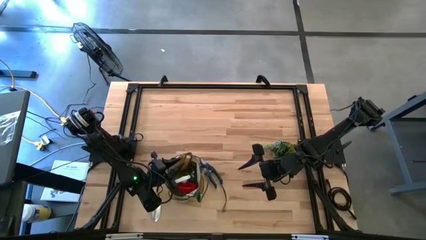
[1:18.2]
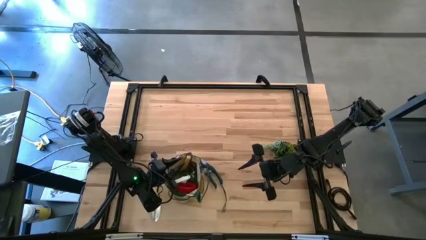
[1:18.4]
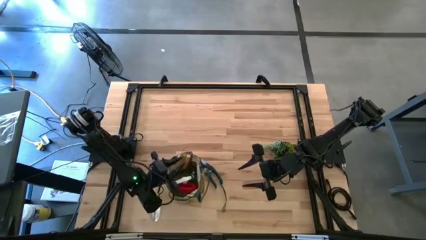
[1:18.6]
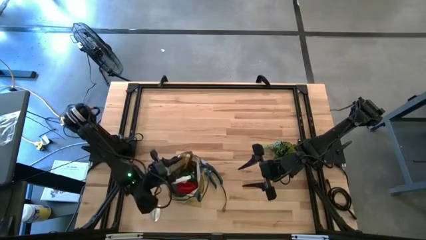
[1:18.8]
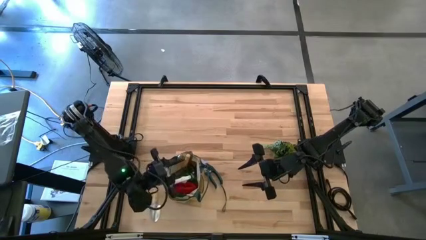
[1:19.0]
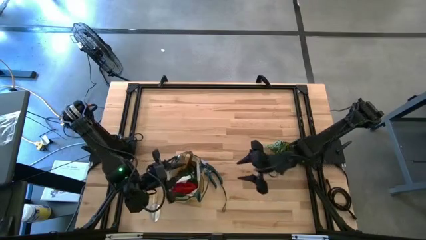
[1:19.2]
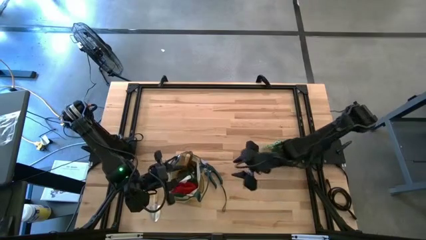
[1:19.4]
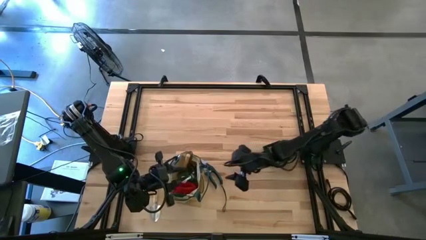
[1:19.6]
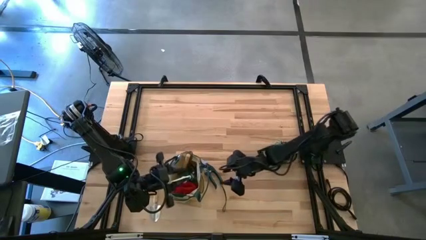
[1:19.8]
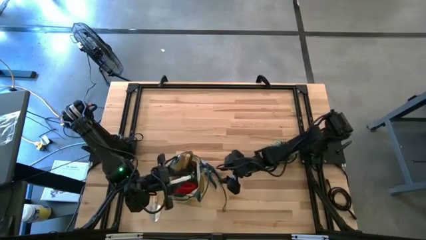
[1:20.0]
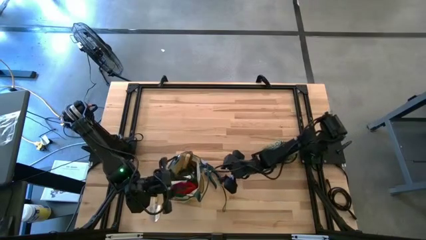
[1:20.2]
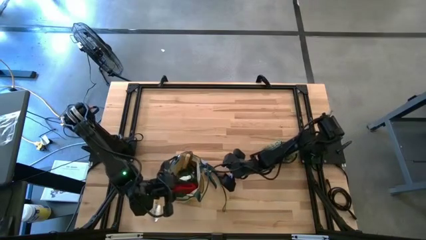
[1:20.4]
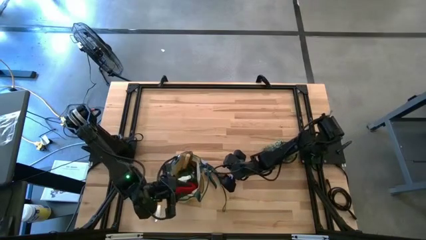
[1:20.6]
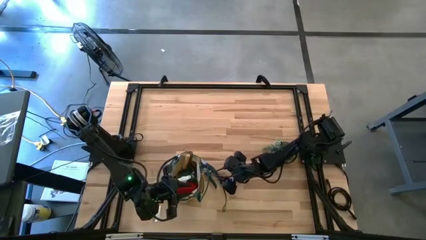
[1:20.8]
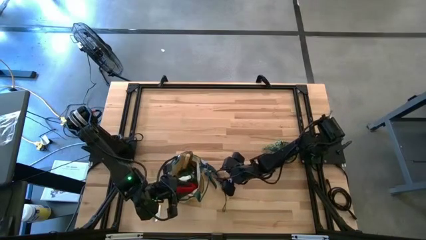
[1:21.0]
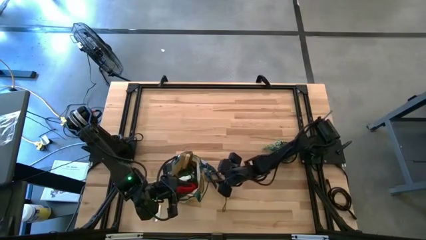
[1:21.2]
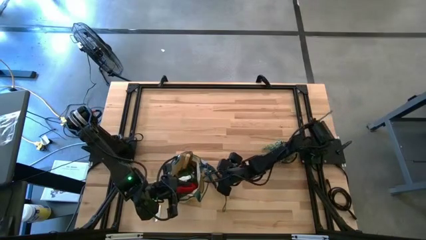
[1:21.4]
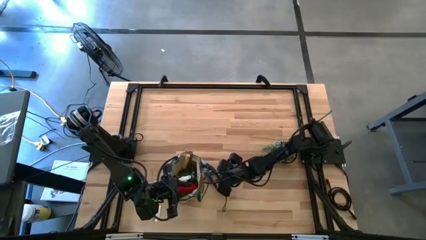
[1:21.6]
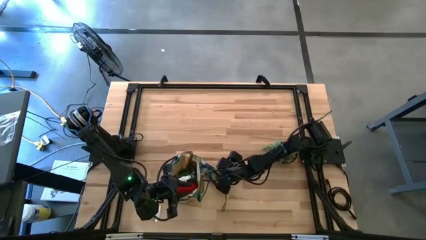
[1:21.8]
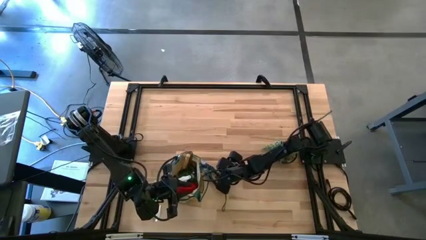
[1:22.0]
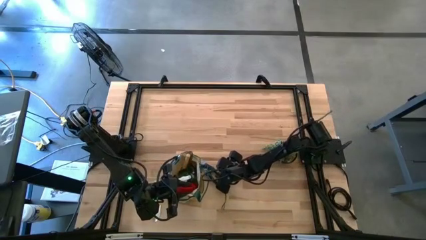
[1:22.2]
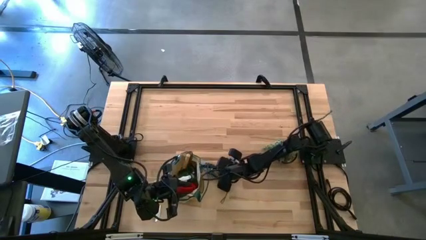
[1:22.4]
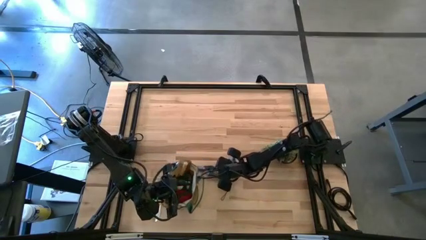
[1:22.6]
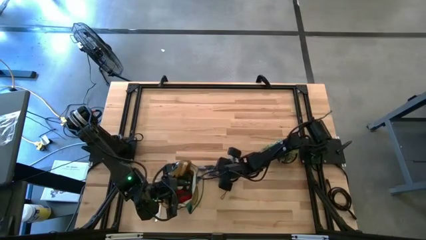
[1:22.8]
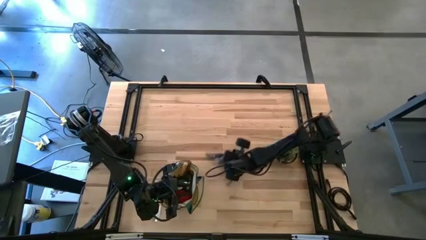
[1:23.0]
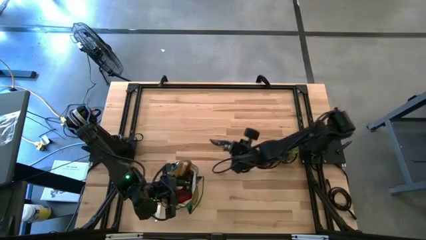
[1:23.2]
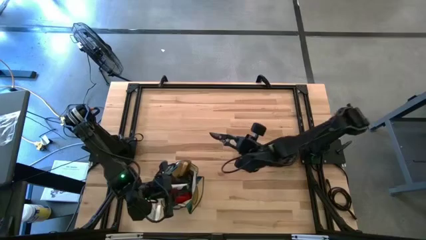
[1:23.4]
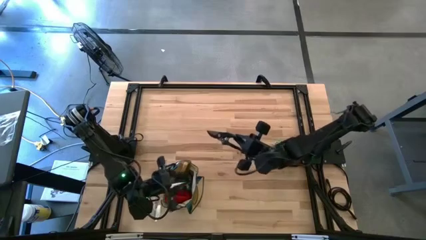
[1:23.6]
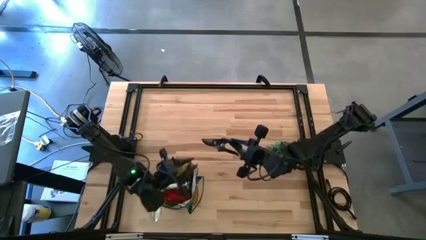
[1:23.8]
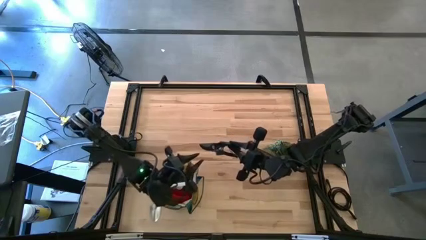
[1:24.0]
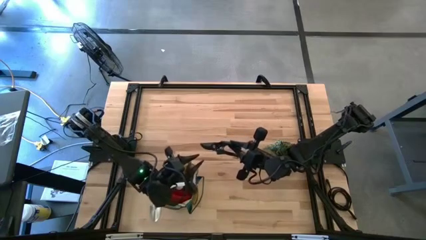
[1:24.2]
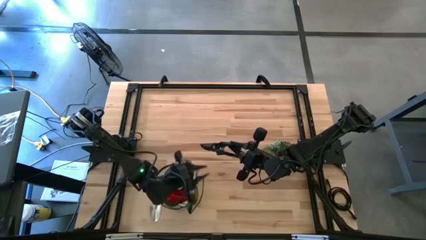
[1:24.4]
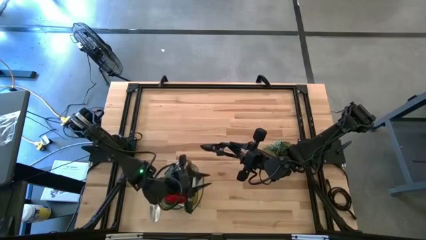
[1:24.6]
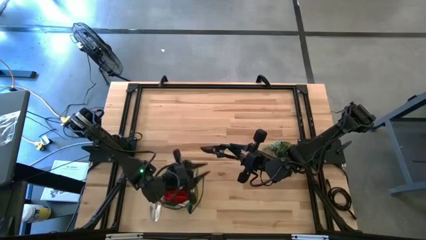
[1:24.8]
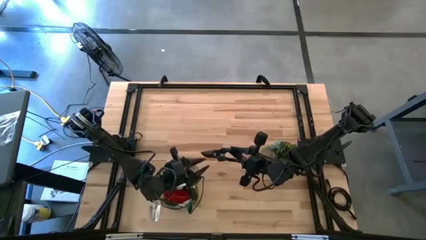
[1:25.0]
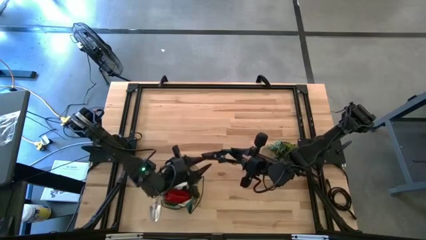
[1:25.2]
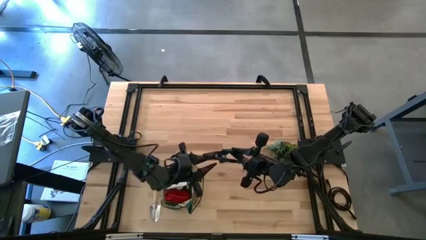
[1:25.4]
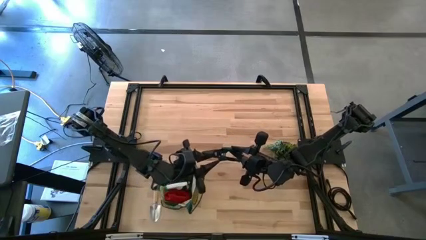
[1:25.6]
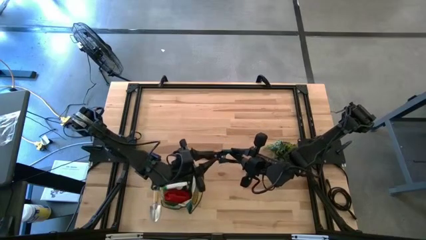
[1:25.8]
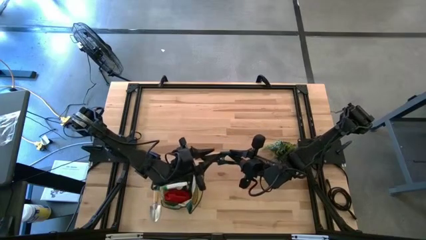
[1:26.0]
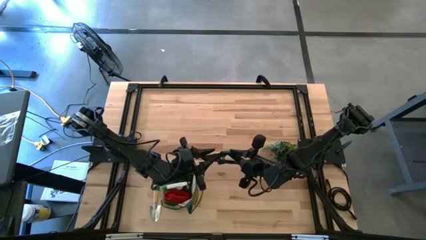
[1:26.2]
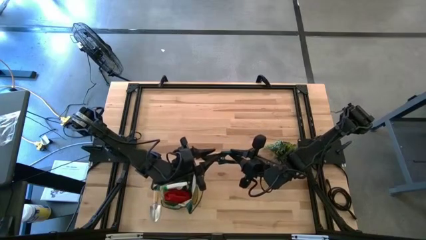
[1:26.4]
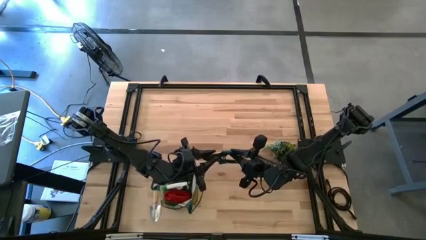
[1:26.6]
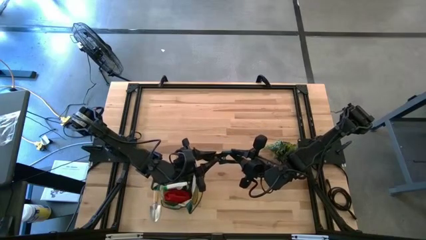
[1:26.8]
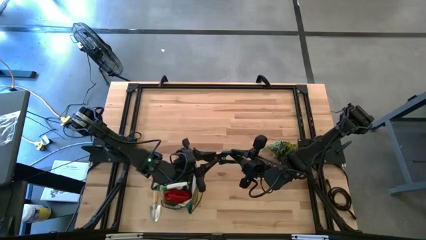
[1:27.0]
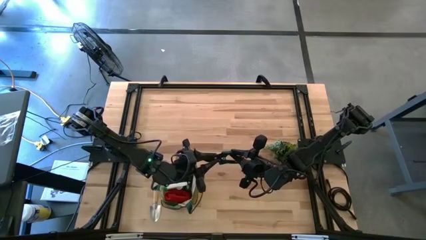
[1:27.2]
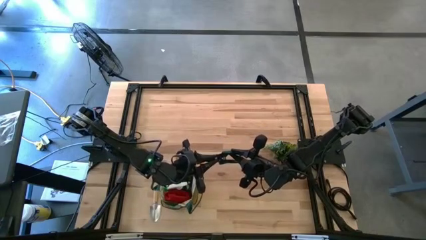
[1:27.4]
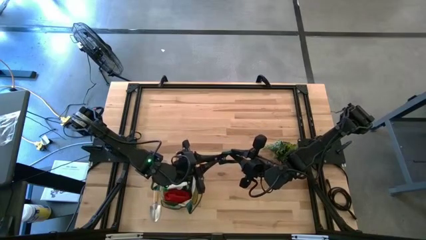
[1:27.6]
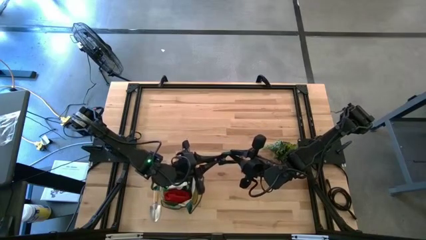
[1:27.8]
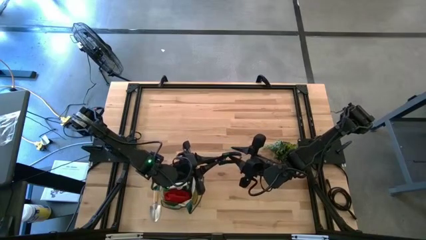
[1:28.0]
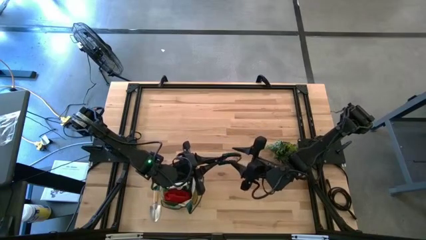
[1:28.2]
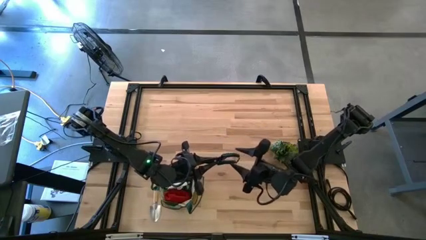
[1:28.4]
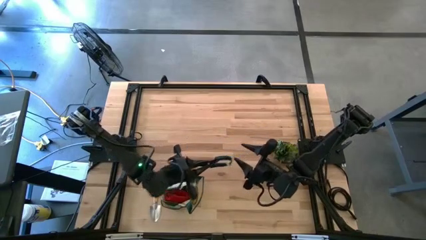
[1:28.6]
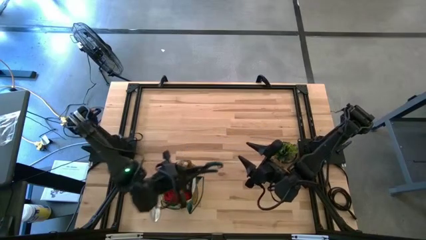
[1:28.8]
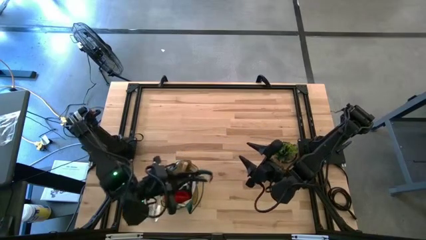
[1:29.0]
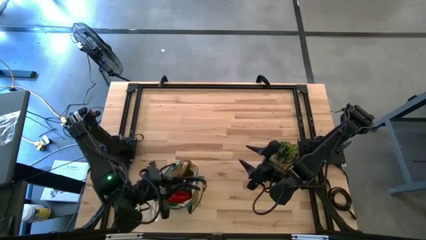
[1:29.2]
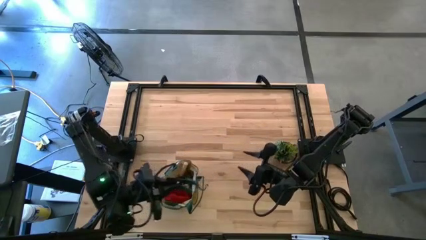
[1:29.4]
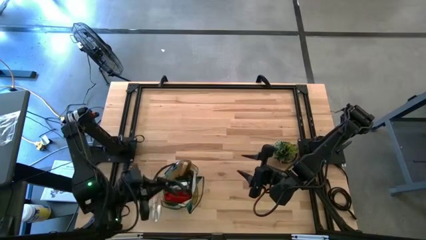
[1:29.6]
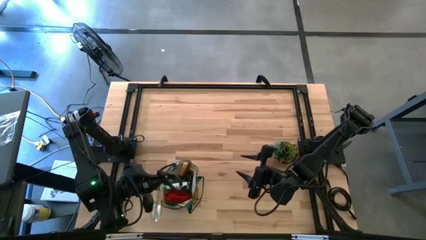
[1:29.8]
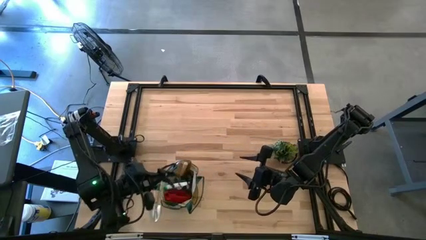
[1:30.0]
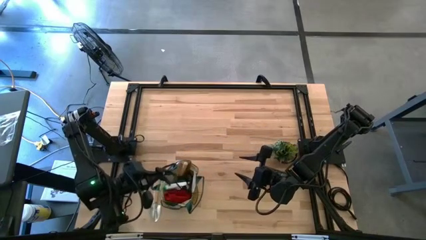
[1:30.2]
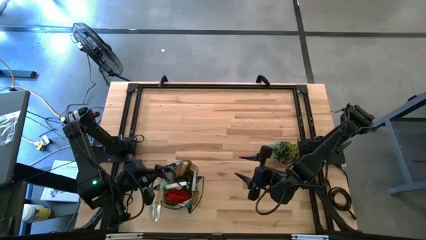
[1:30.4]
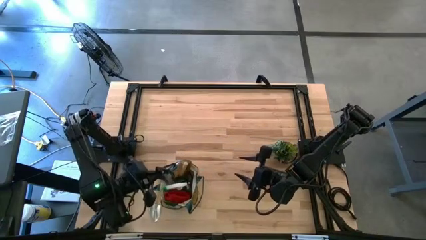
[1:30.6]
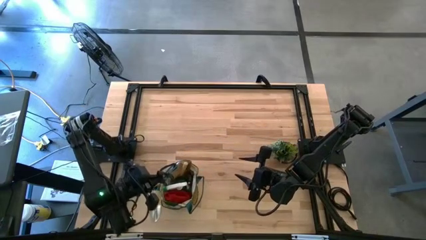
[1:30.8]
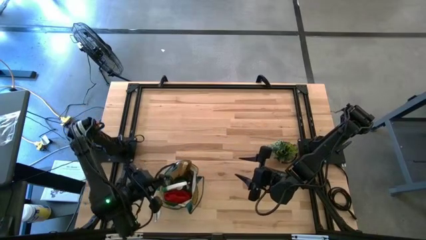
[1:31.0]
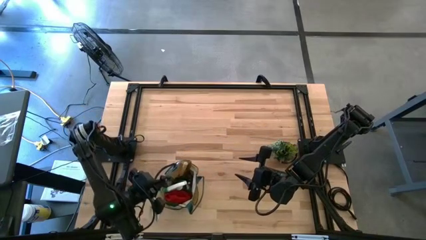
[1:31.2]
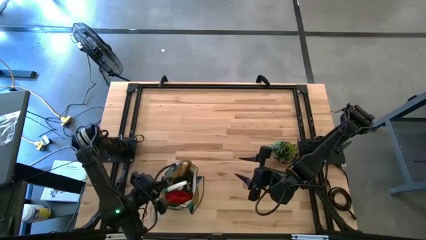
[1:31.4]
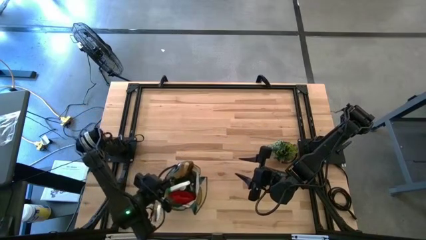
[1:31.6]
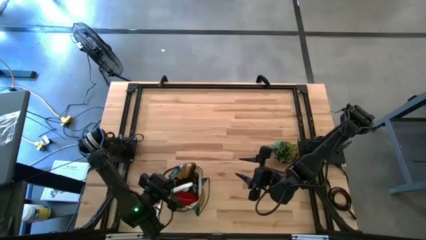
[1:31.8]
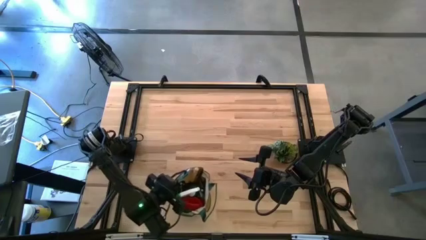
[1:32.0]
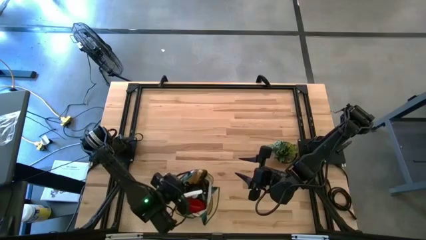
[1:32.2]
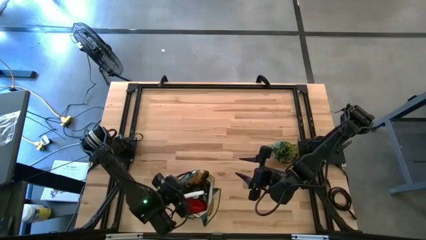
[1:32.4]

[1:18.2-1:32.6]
Task: Pick & Place Garden tools in Gardening bag
Put the green shears into the brown gardening bag

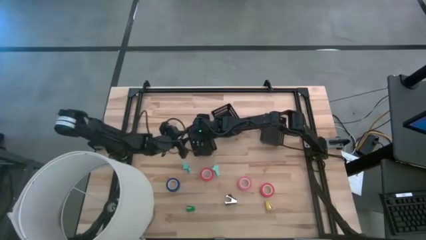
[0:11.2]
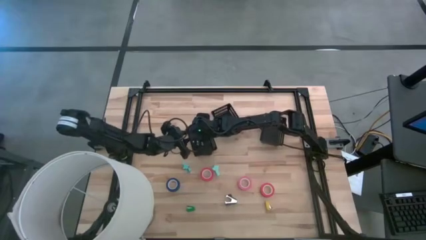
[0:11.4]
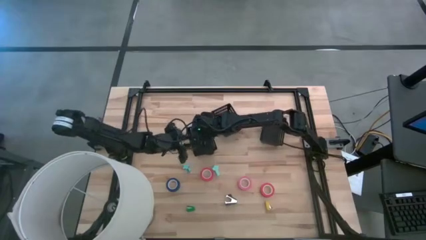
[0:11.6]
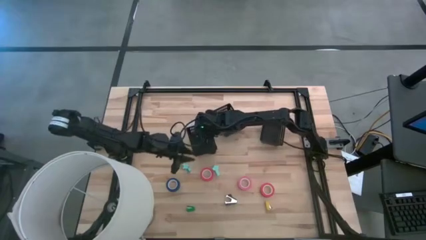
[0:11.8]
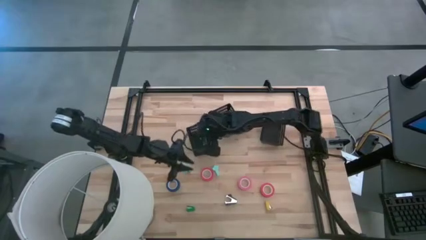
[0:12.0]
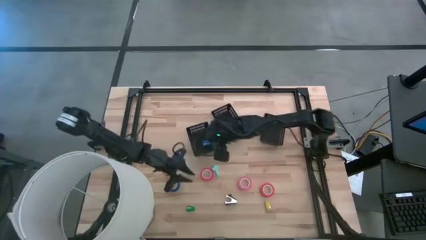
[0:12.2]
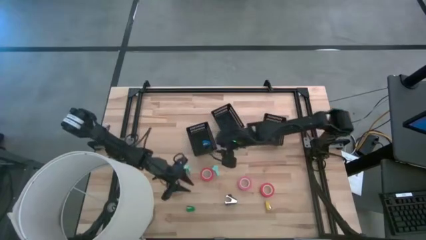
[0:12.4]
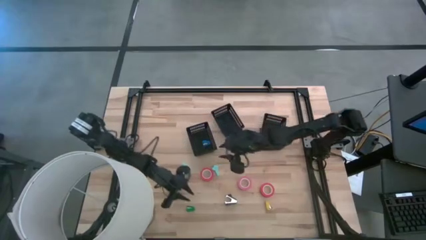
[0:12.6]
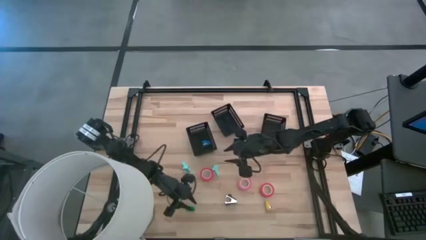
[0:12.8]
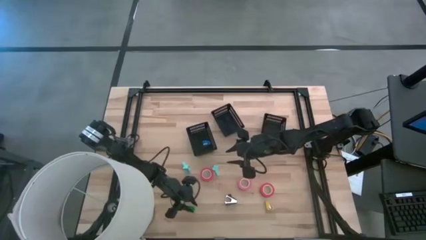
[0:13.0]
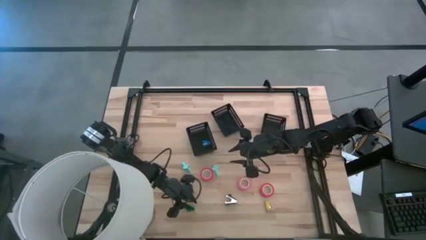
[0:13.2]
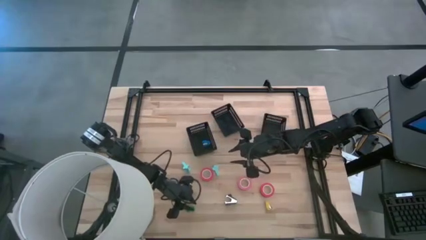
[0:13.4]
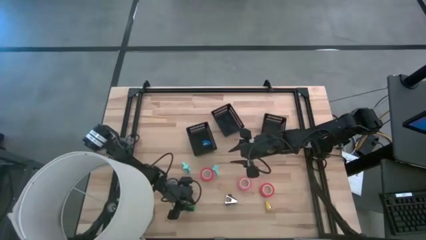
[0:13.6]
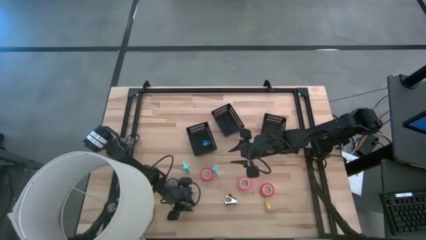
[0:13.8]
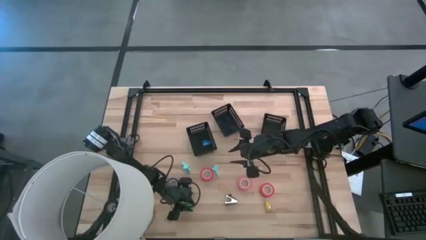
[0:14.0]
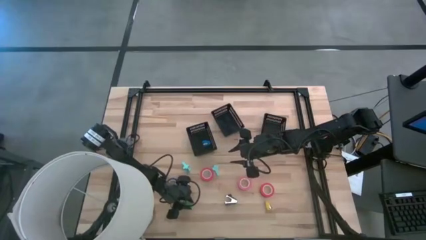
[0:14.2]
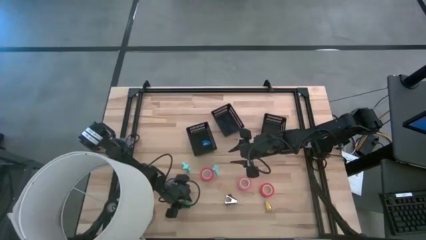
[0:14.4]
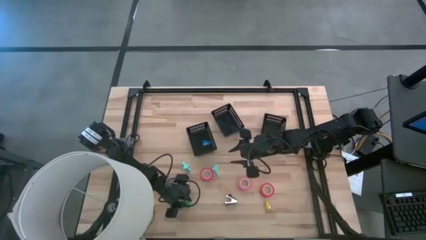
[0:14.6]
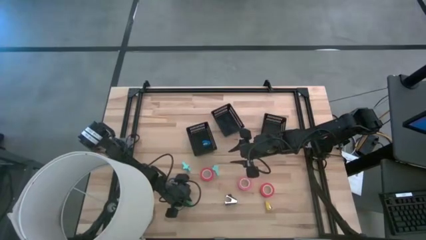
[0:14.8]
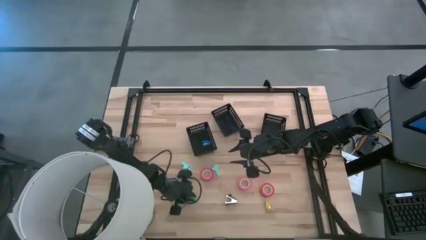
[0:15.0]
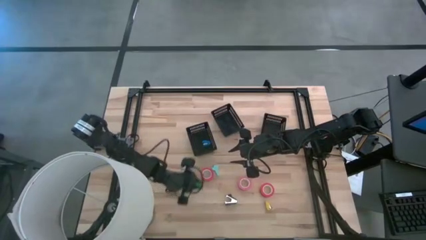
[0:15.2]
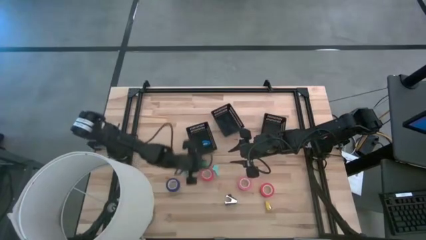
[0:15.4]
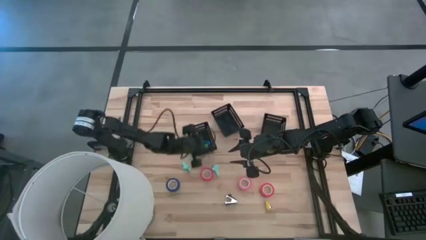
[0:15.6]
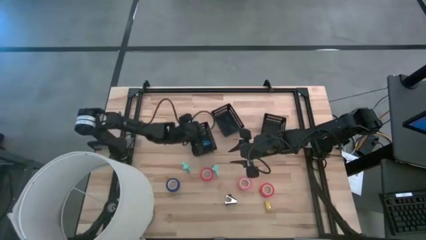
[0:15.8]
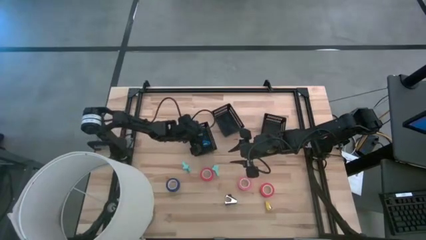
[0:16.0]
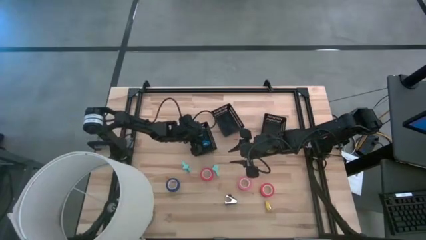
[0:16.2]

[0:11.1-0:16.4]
Task: Pick and place Stapler, Stapler remover, tape
Put the green stapler into the left black basket
